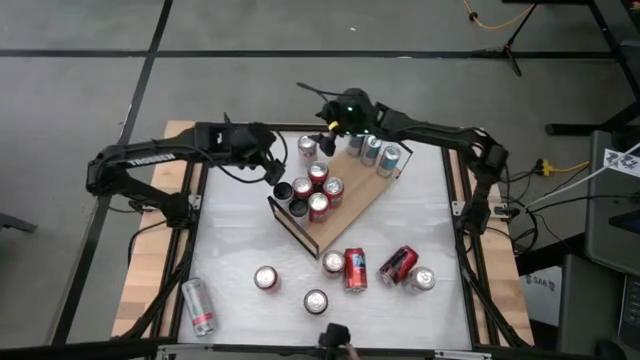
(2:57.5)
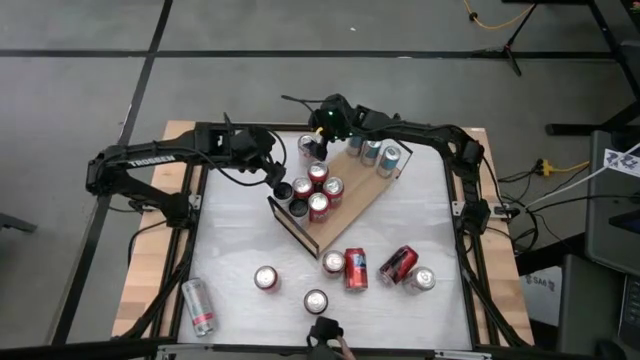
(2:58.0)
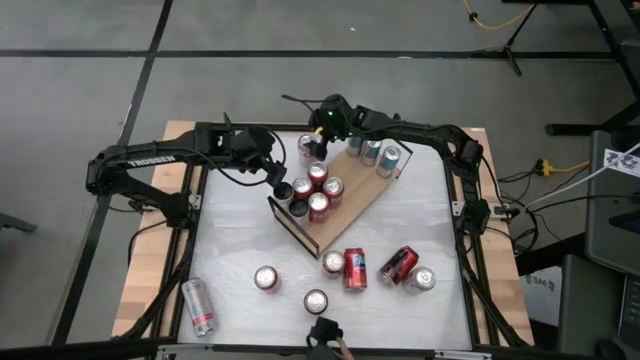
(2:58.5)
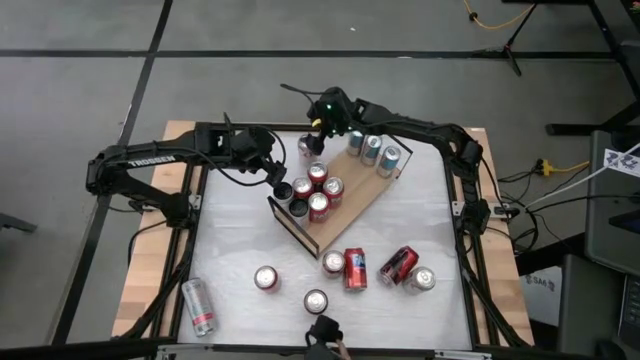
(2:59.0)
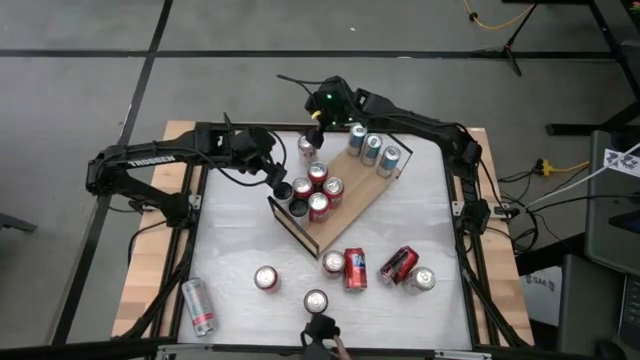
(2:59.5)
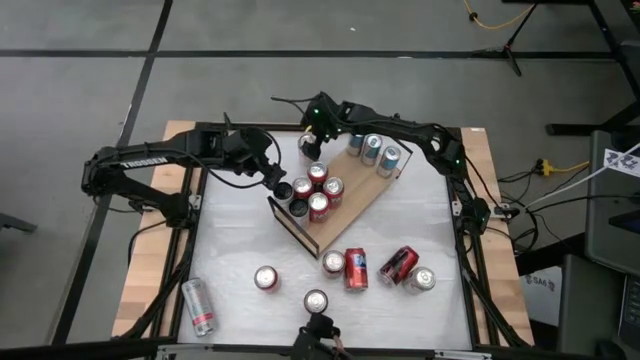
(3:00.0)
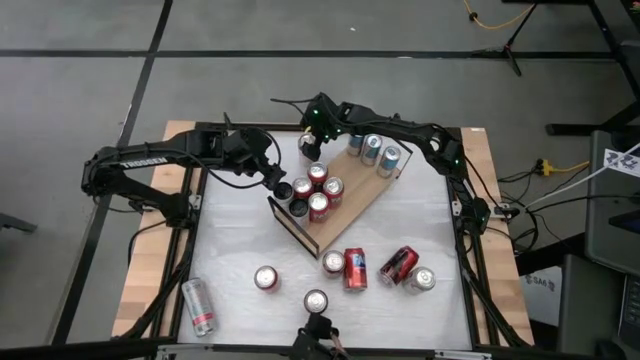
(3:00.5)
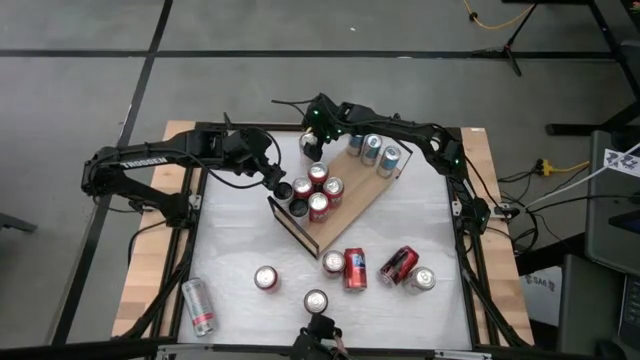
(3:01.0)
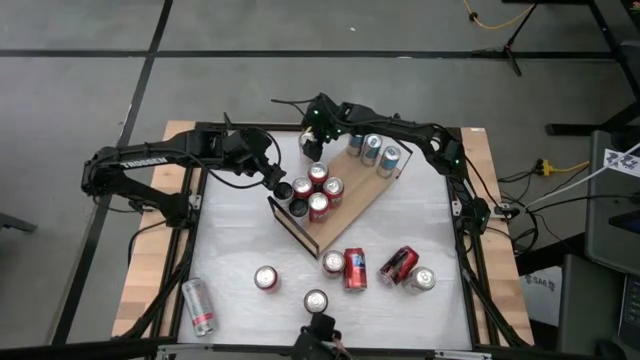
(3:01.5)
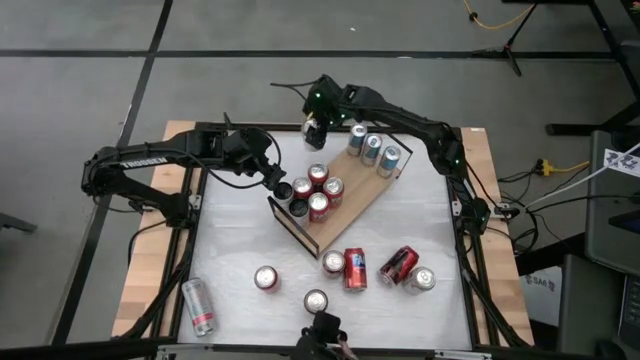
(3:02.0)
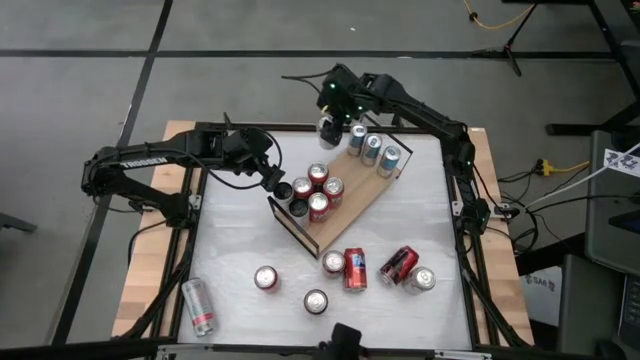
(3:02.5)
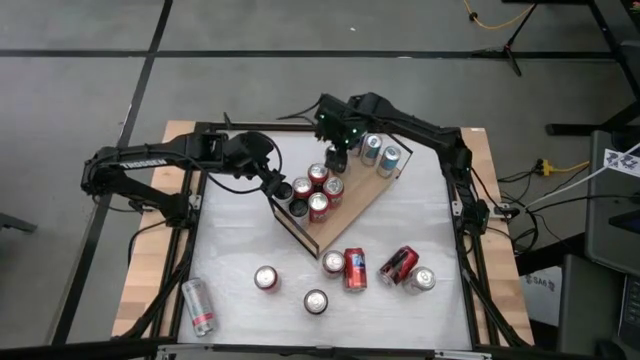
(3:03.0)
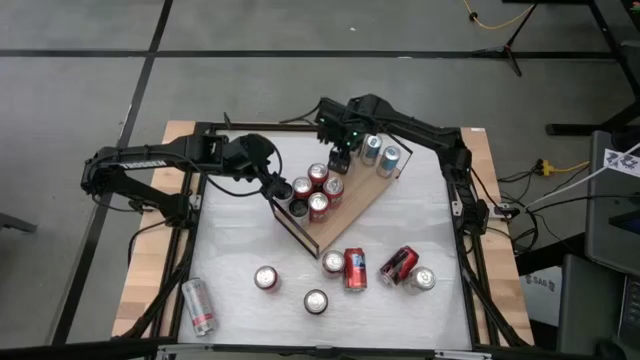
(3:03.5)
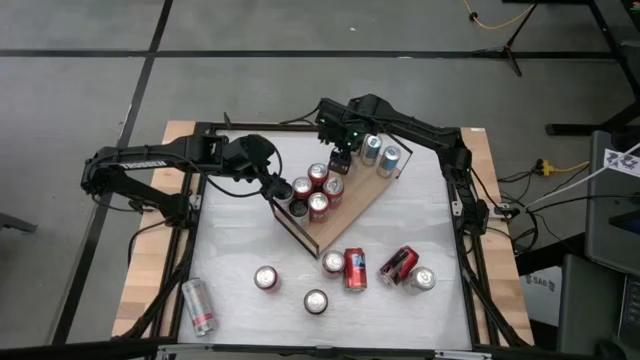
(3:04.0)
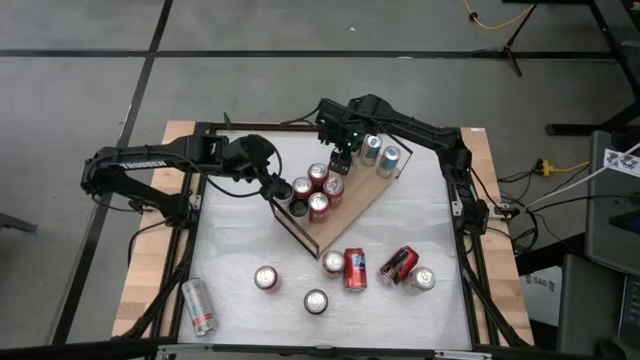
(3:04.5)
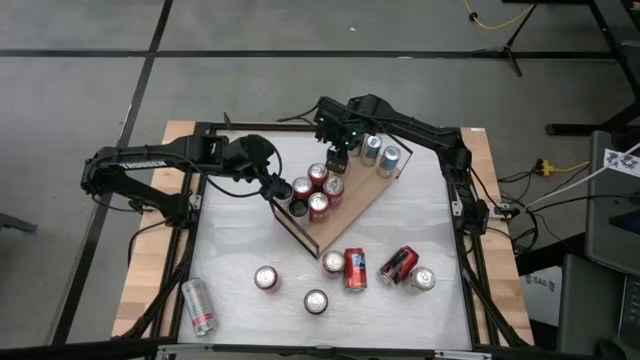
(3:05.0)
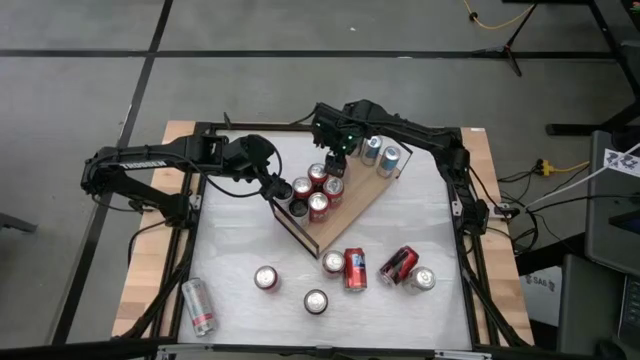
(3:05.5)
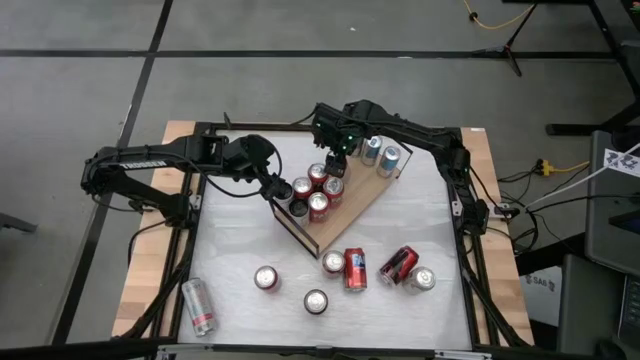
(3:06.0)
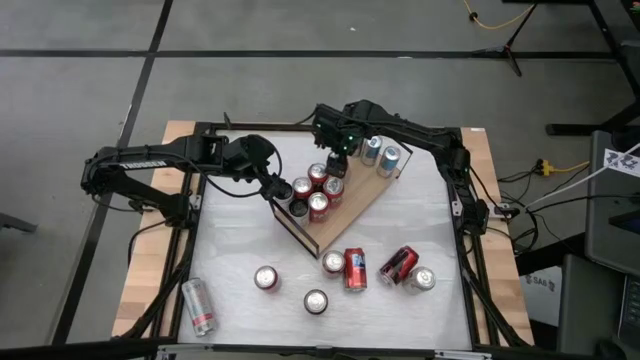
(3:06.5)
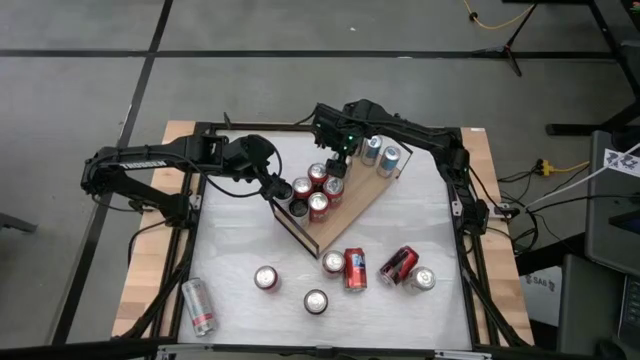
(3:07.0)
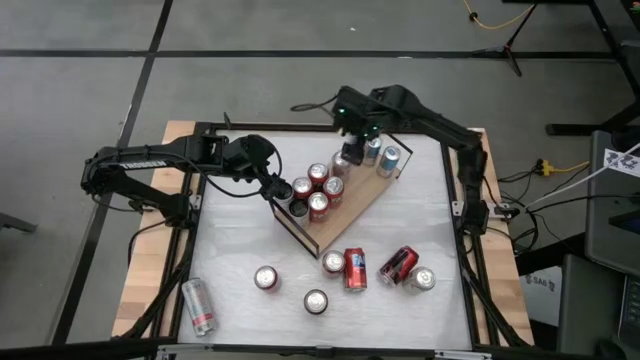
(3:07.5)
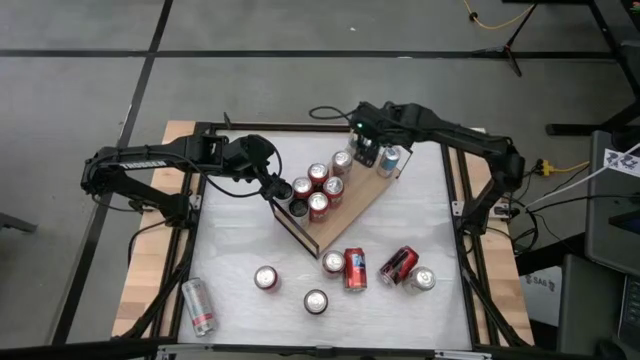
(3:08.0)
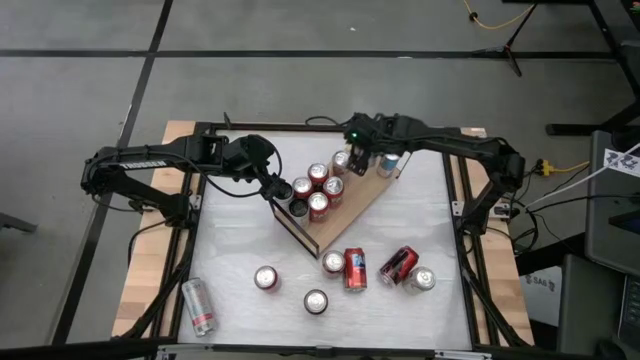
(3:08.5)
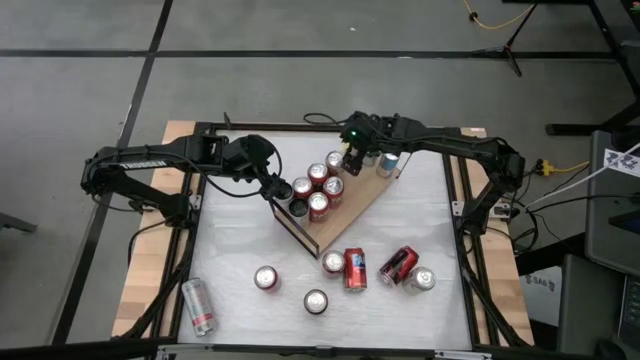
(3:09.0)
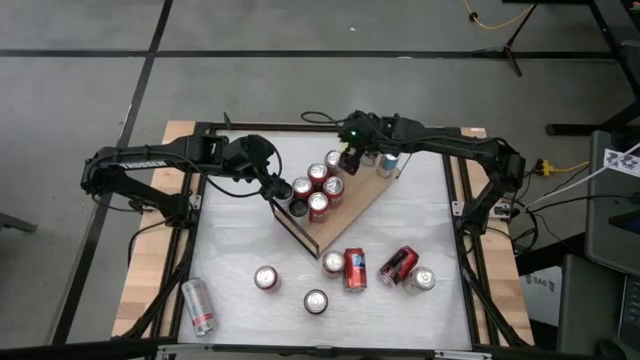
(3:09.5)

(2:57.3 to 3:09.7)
Task: Place canned beverage on shelf
Put the red silver soda can on the shelf

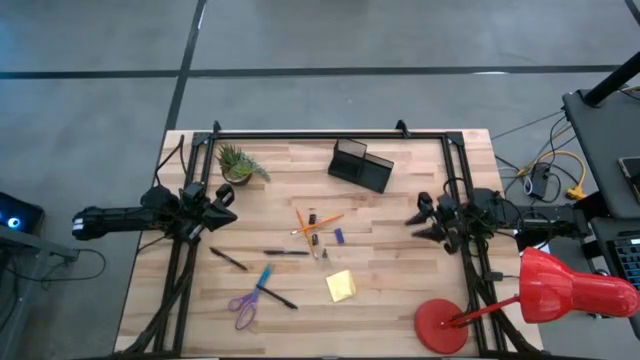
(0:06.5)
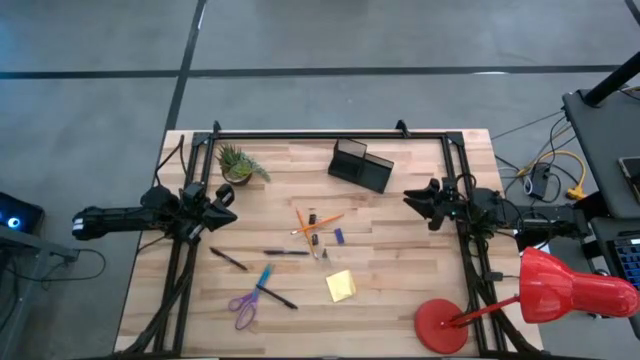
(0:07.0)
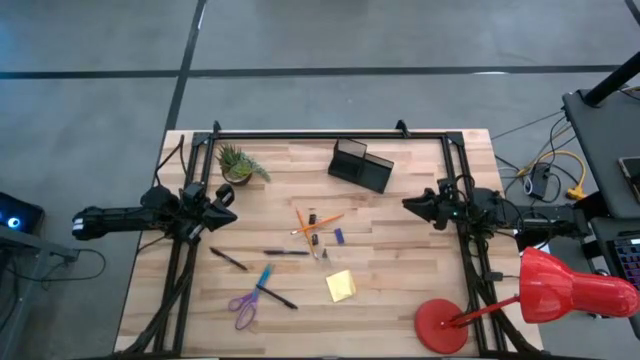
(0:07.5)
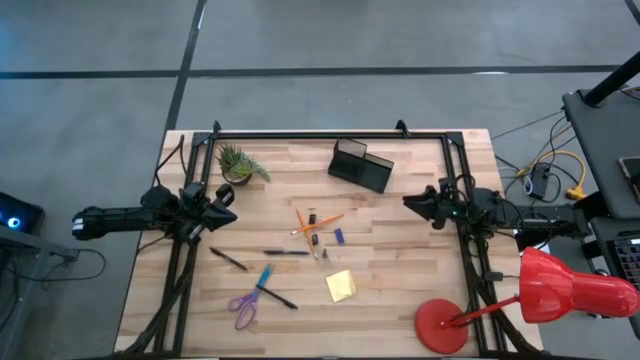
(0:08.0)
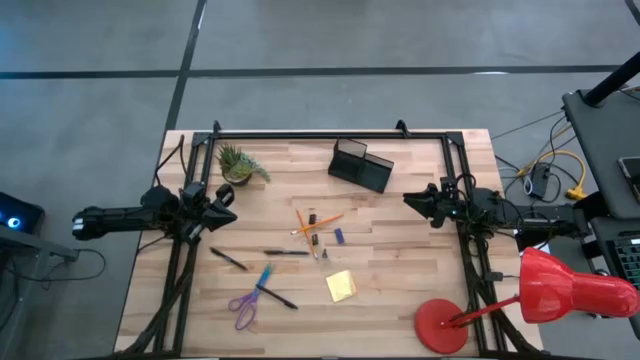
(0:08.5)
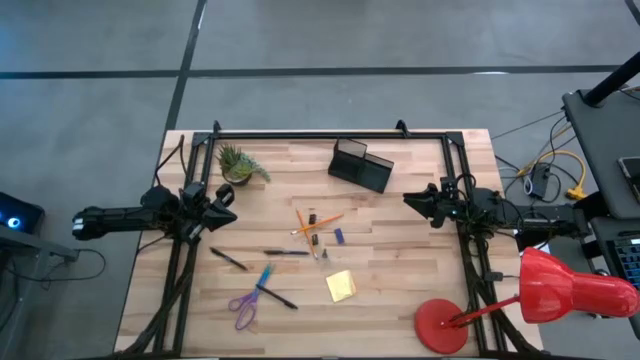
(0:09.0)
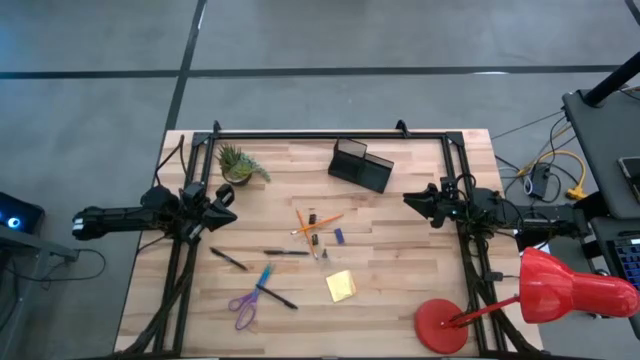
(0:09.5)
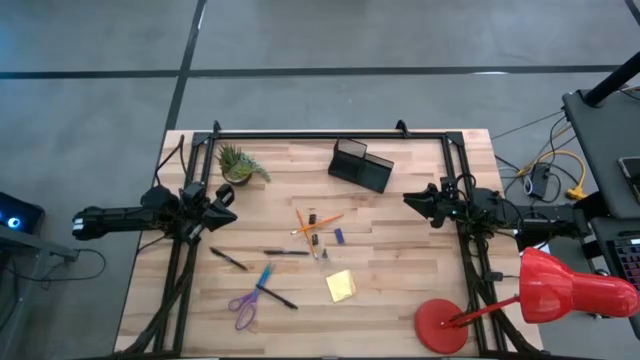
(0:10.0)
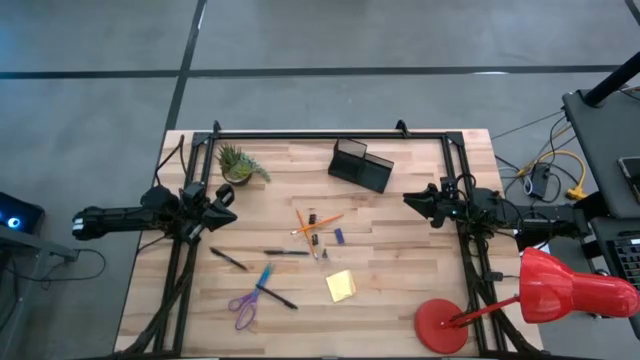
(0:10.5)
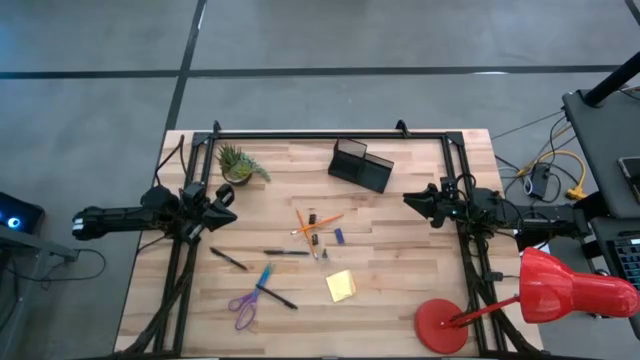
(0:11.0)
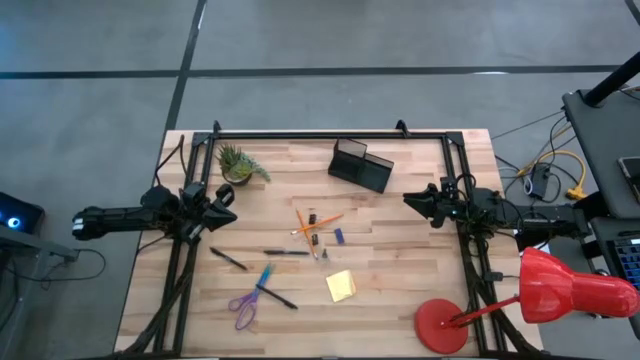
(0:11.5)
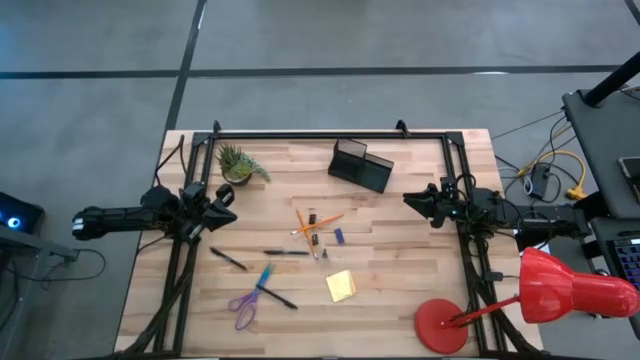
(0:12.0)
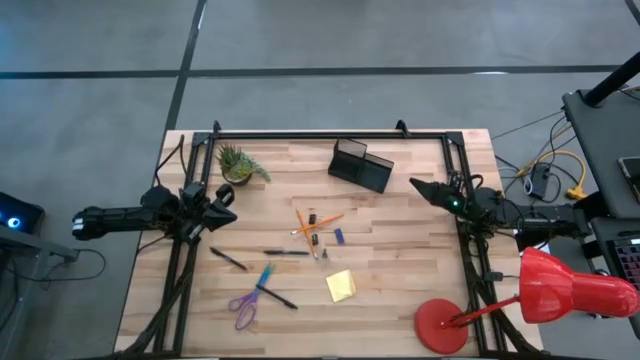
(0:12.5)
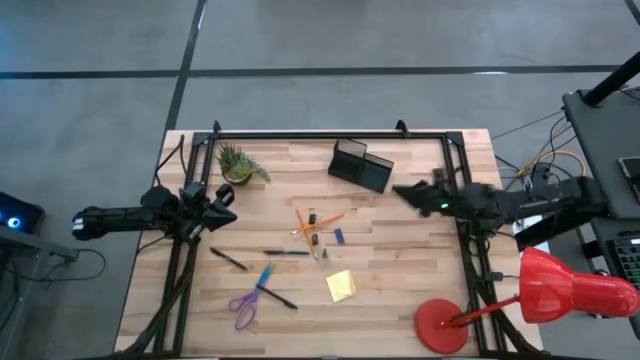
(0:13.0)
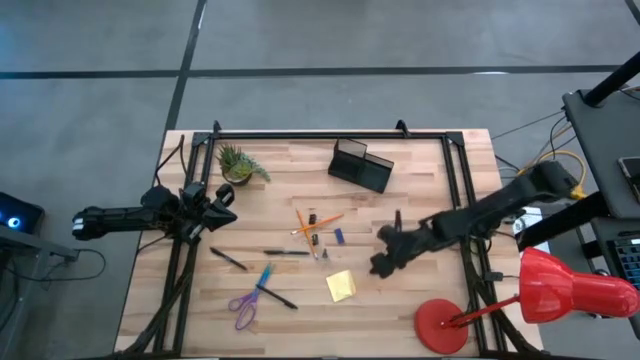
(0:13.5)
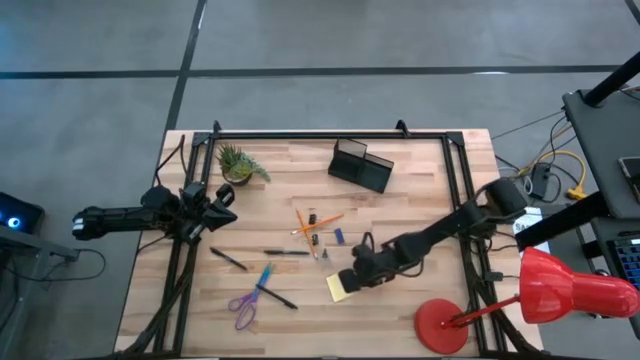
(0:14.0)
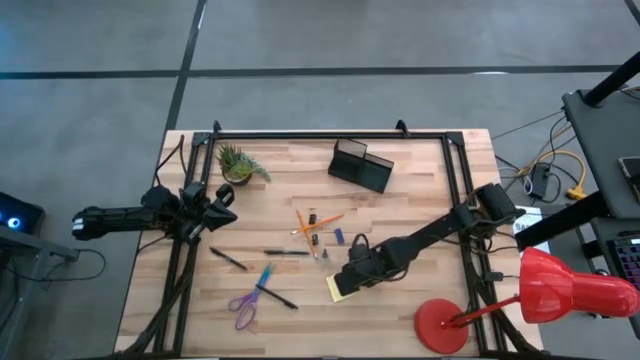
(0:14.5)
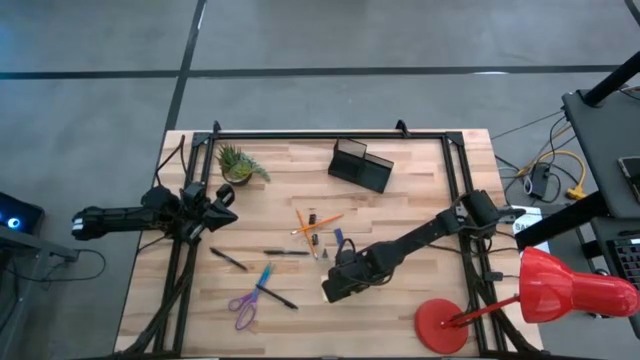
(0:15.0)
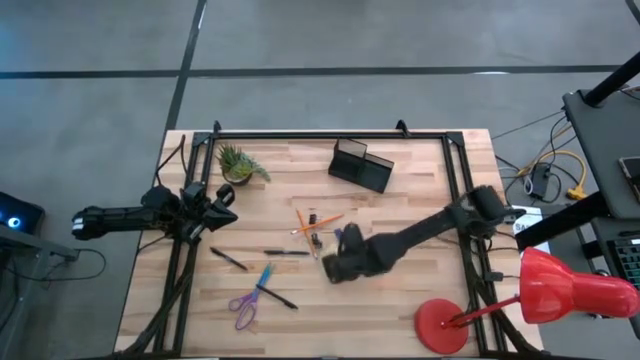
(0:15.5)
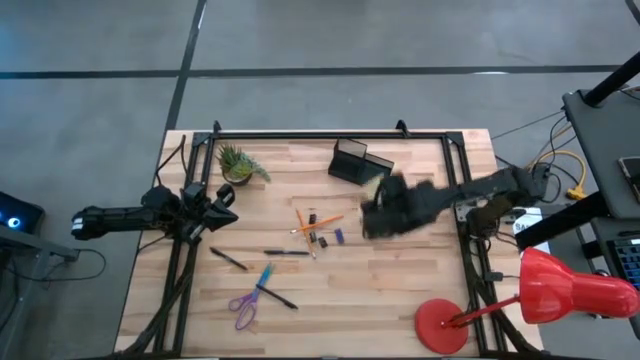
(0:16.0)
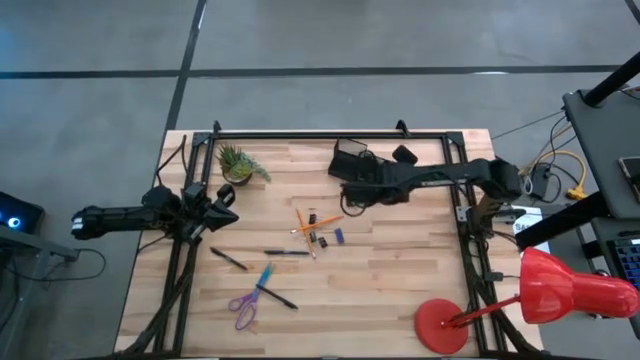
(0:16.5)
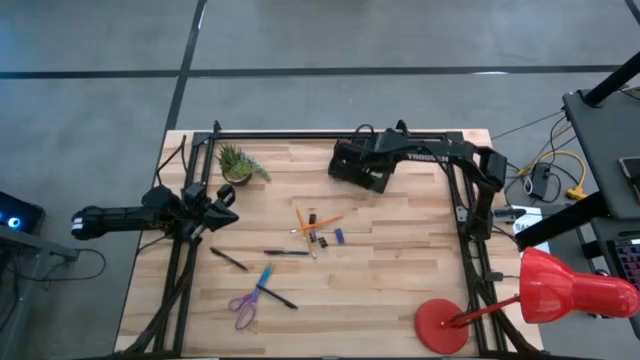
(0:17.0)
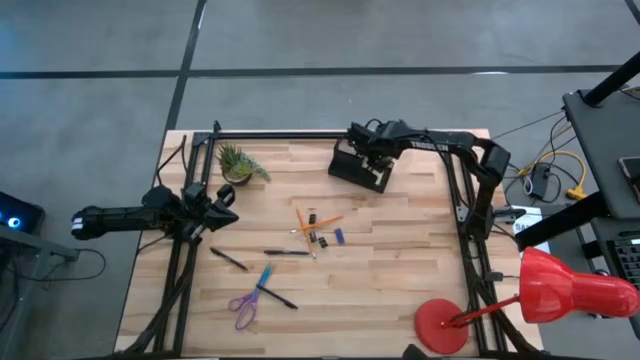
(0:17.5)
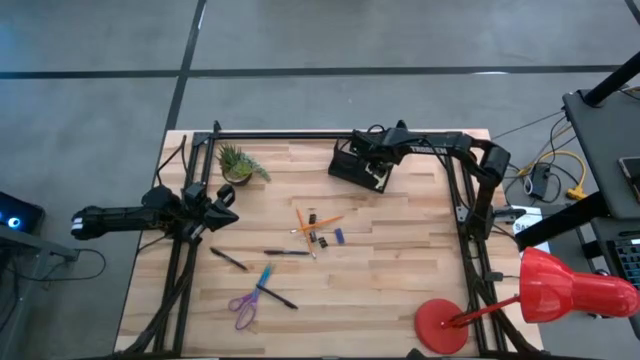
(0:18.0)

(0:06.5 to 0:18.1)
Task: Pick and place office supplies into organizer
Put the yellow sticky note into the black desk organizer
